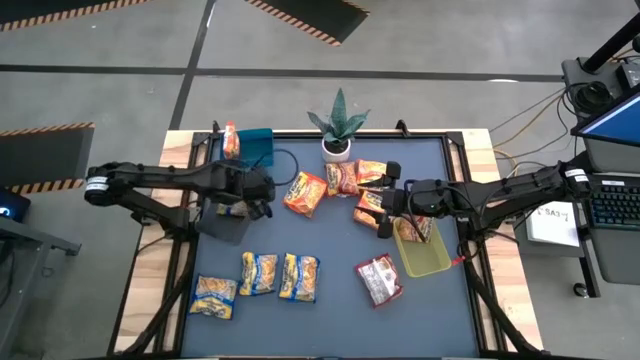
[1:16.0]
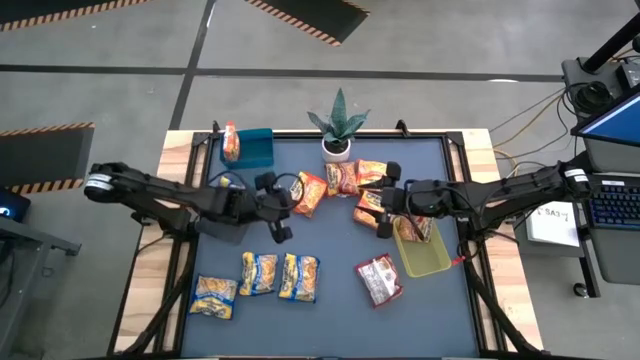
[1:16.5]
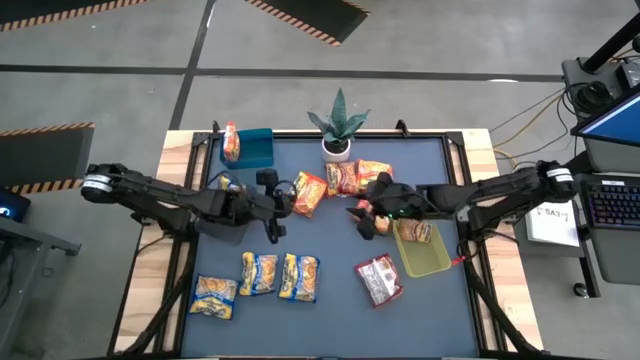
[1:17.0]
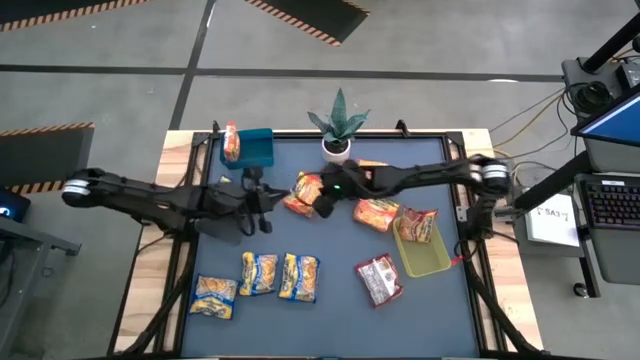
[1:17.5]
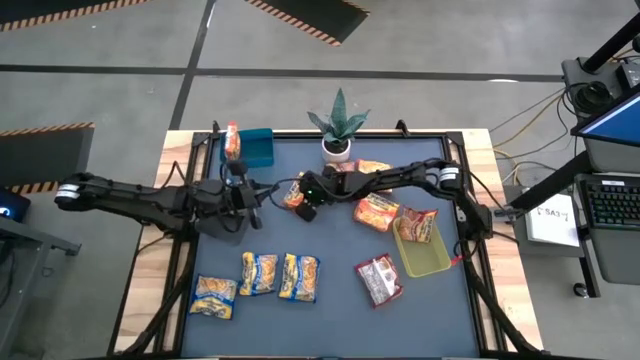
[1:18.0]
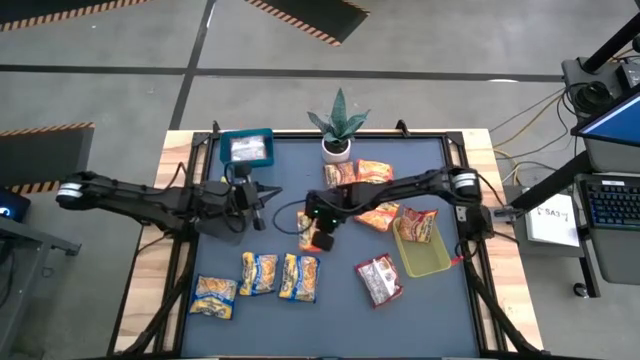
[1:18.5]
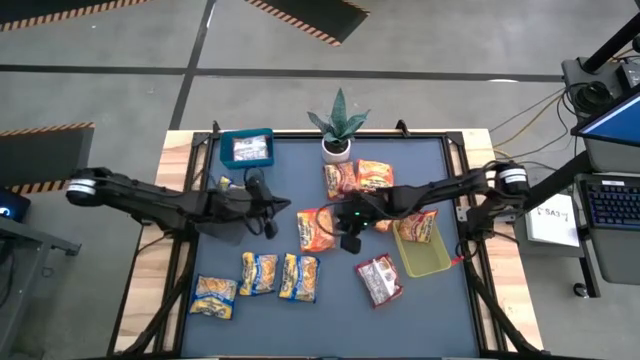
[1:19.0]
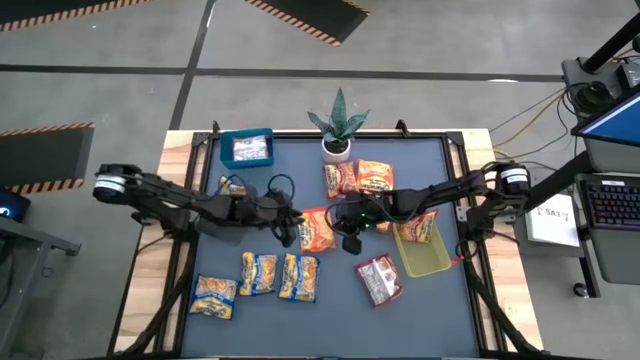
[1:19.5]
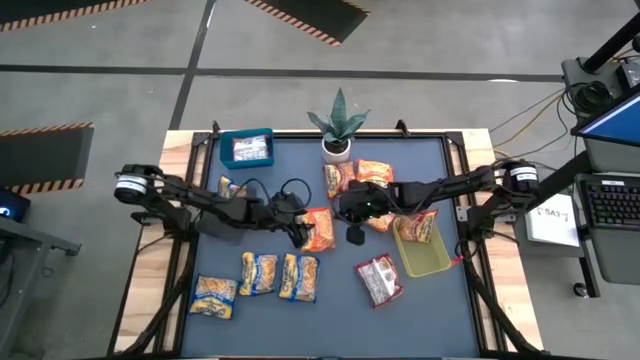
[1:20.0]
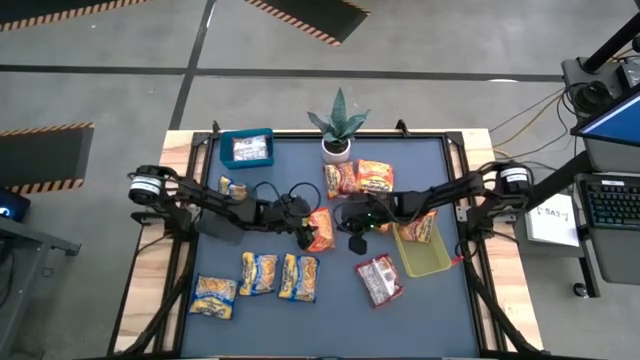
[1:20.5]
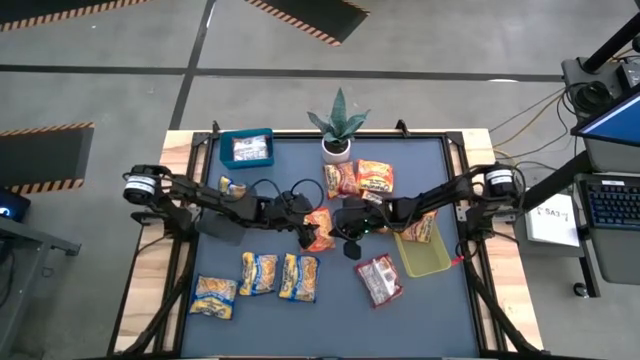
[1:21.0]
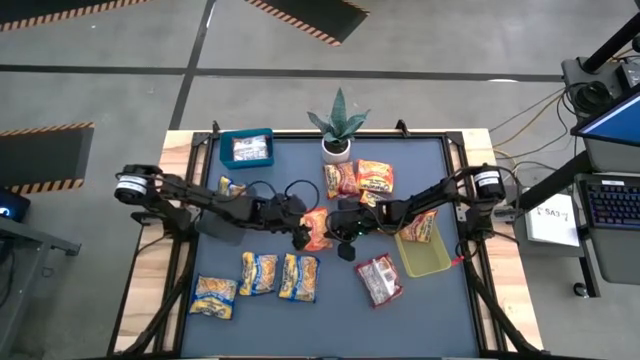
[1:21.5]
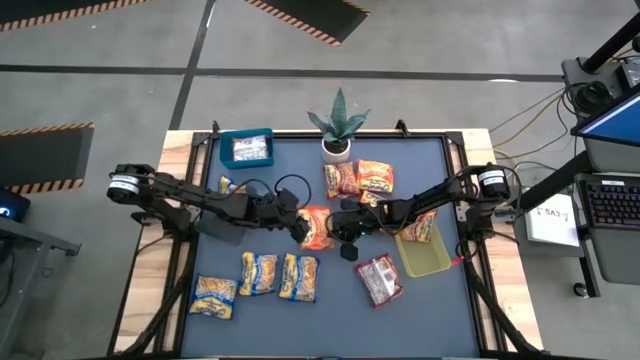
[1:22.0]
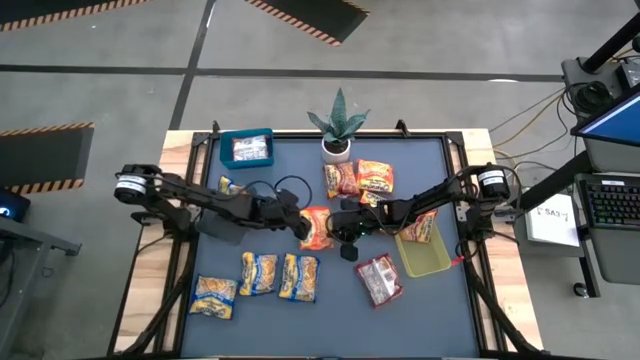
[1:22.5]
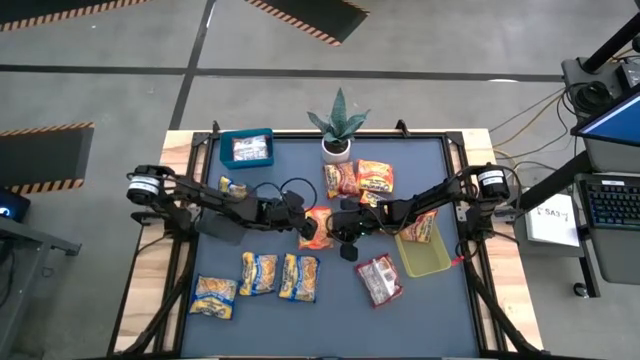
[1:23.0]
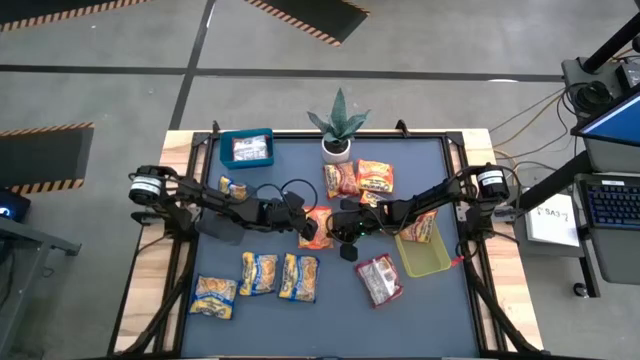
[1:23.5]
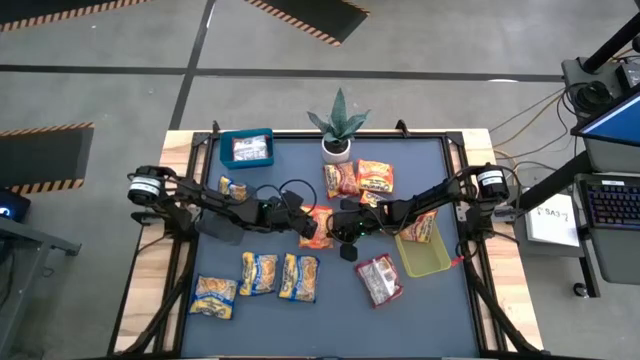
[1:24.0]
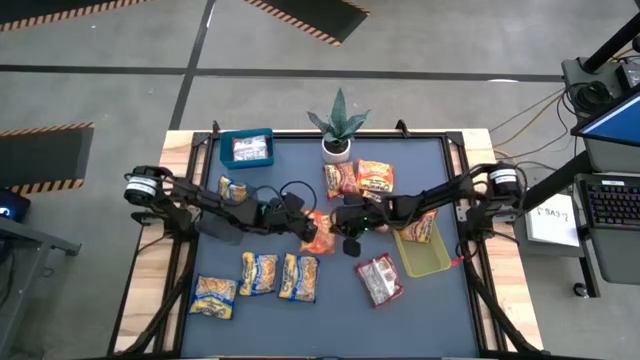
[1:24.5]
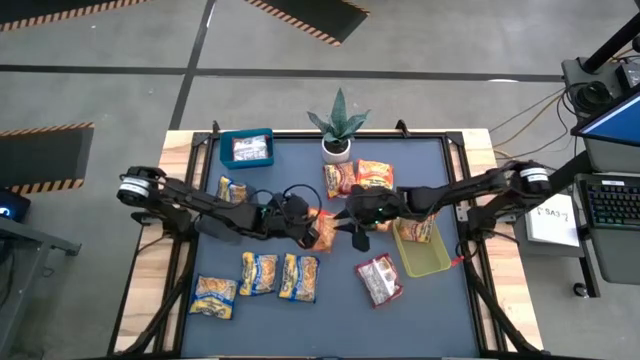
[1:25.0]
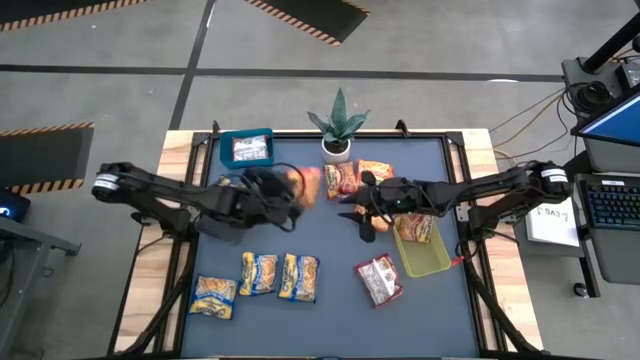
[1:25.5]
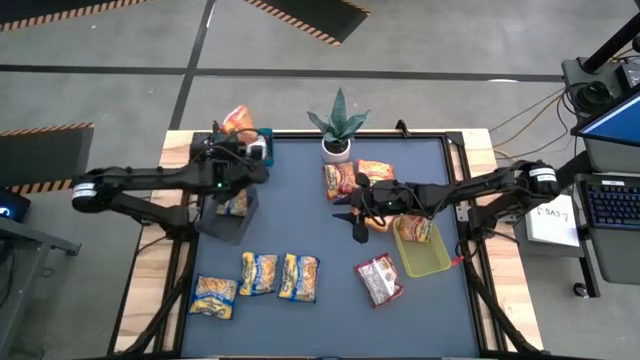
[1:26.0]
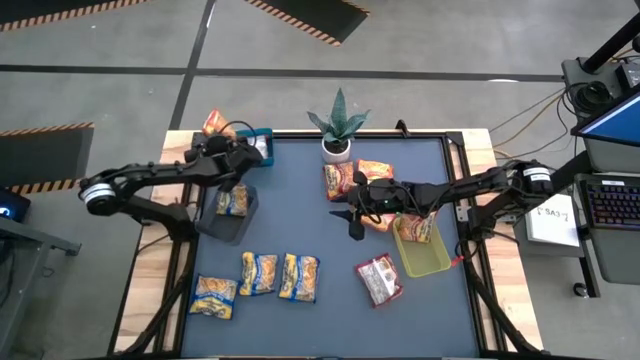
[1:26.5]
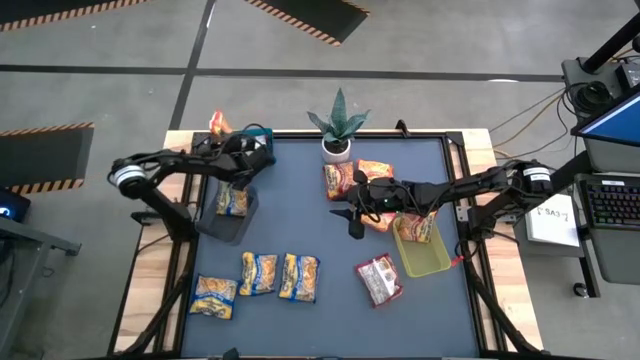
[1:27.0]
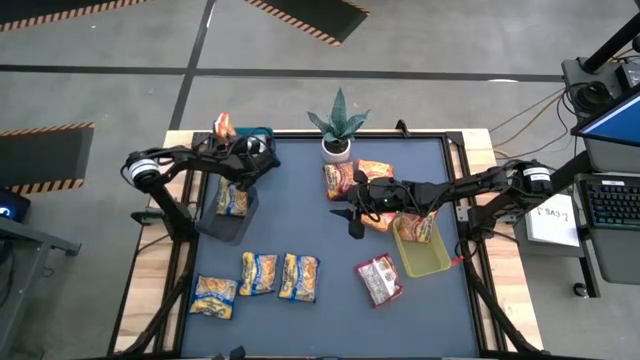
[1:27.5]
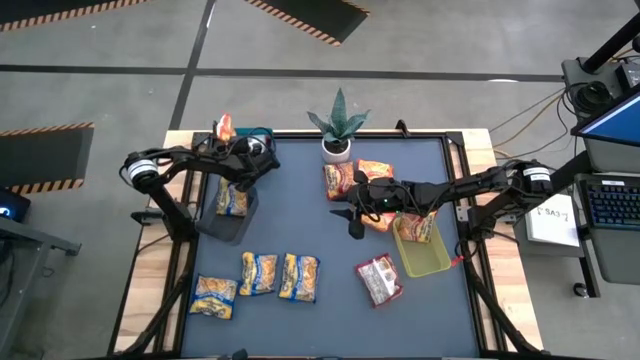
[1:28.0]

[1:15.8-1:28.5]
Task: Sort Maruchan noodles
Put the orange noodle pack into the blue bin

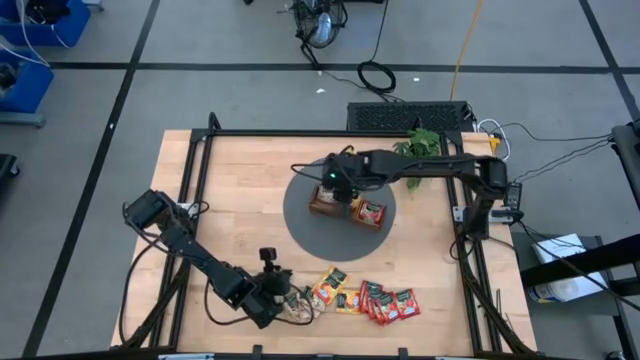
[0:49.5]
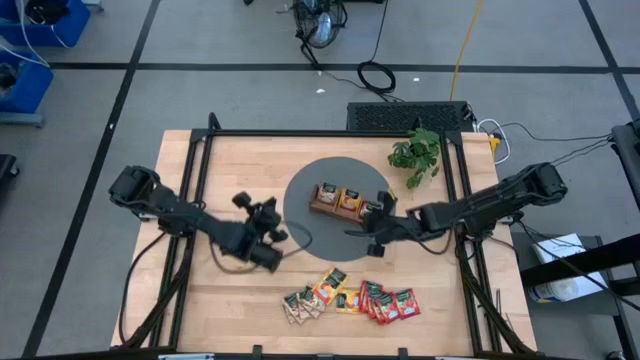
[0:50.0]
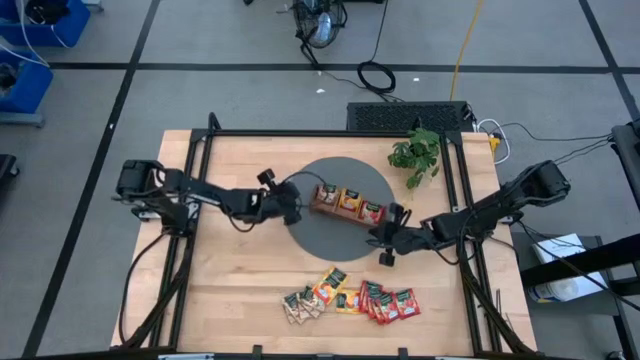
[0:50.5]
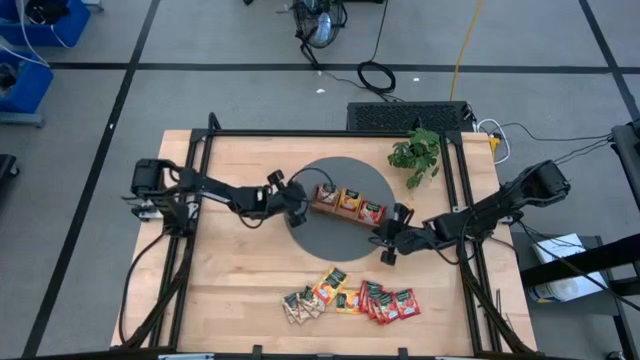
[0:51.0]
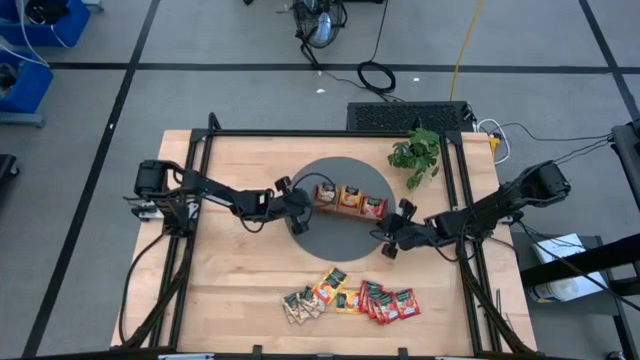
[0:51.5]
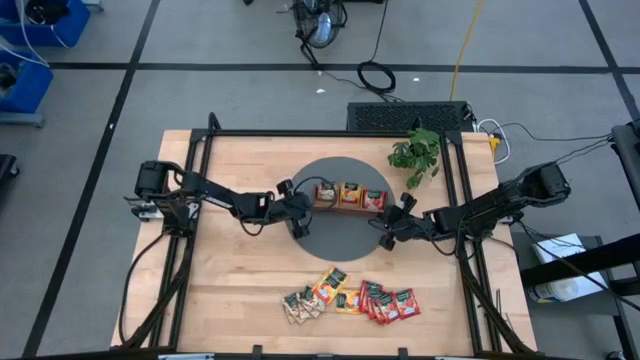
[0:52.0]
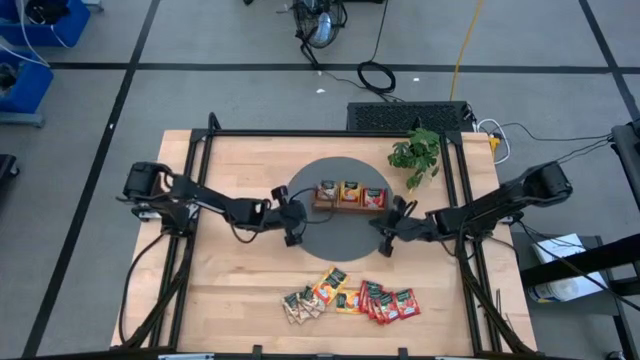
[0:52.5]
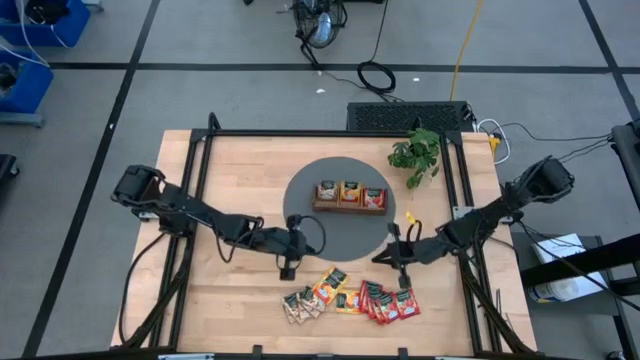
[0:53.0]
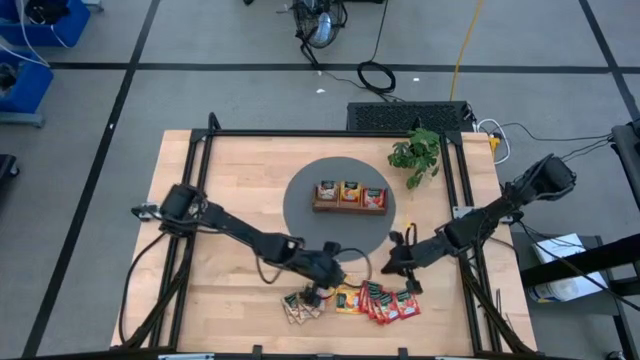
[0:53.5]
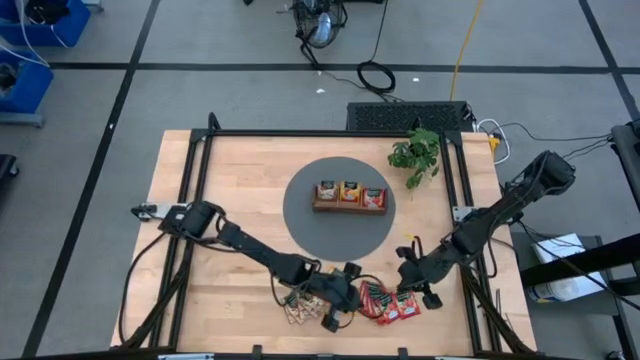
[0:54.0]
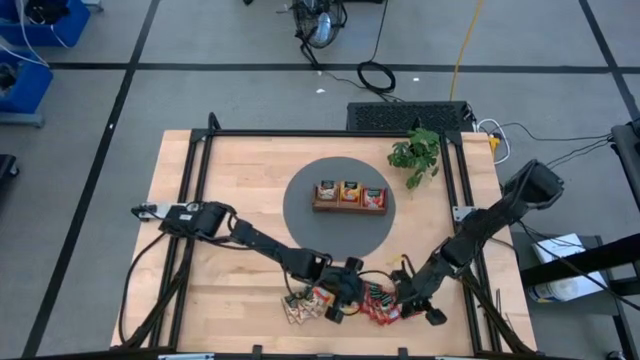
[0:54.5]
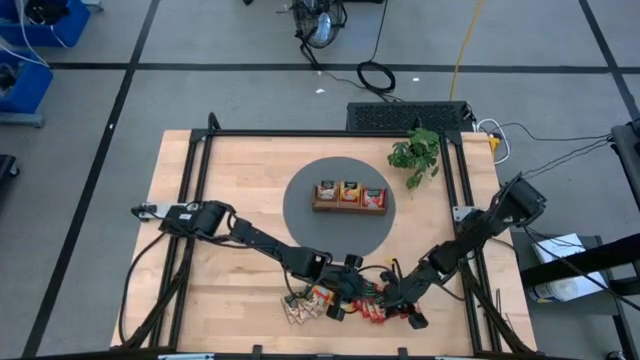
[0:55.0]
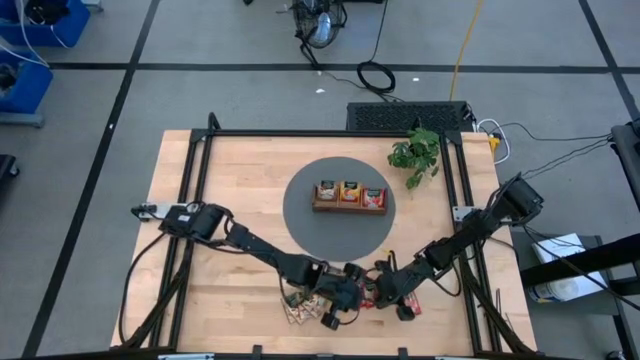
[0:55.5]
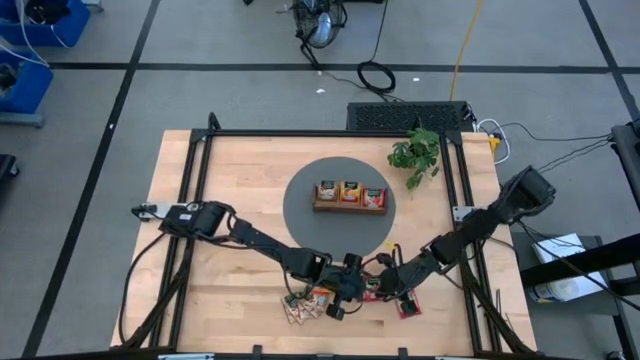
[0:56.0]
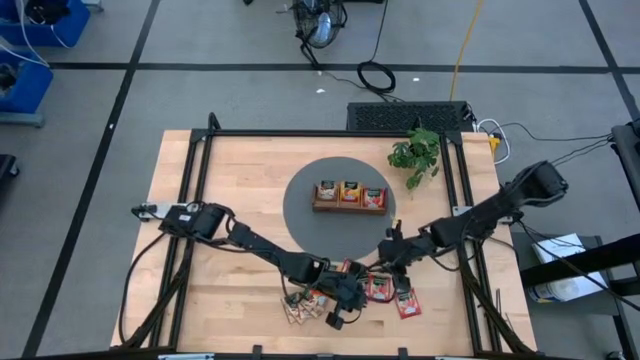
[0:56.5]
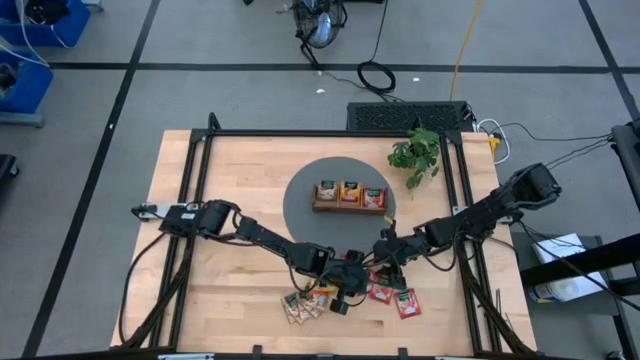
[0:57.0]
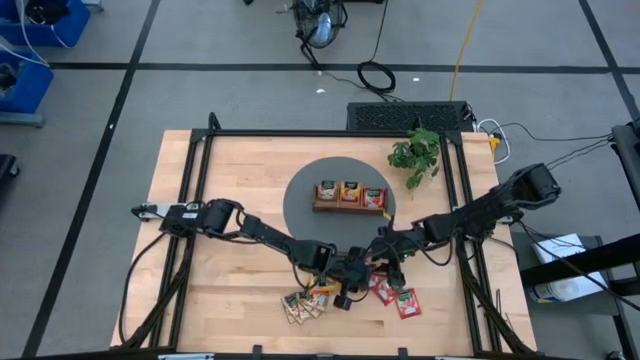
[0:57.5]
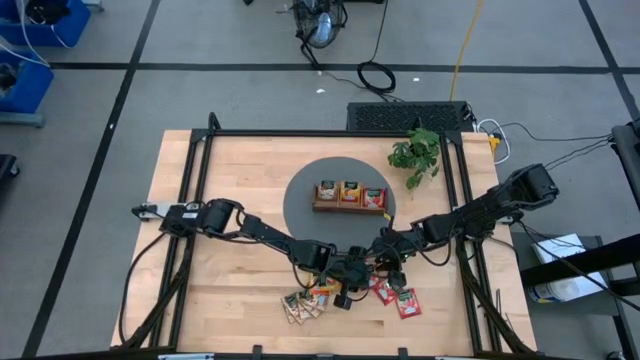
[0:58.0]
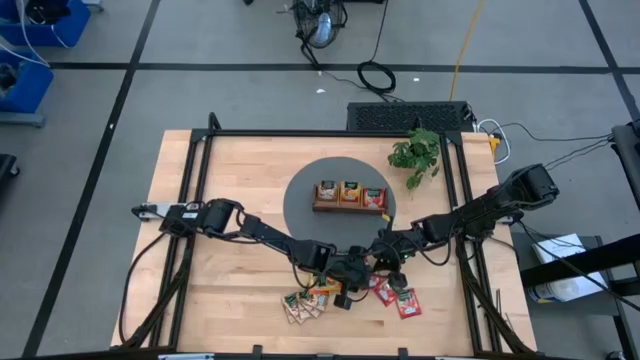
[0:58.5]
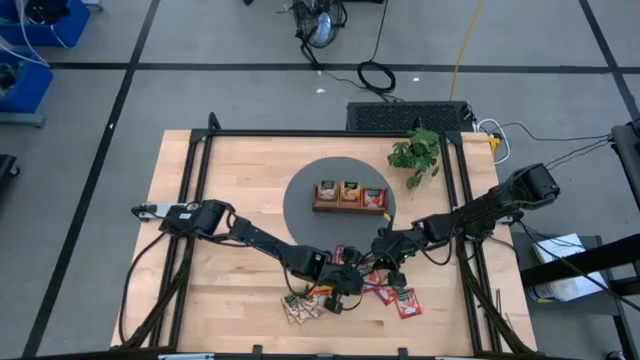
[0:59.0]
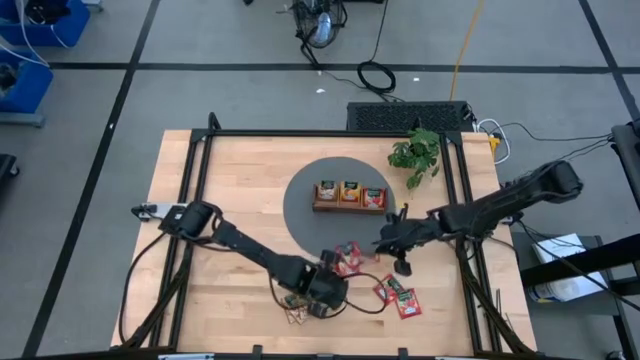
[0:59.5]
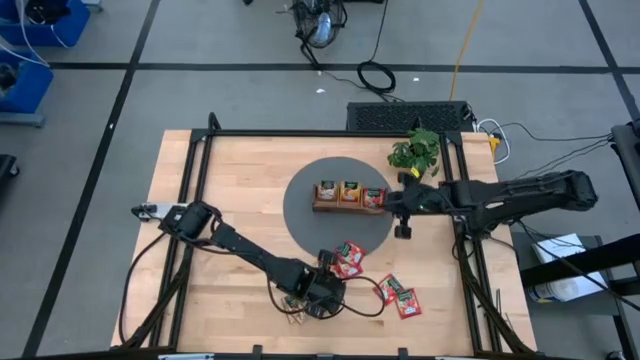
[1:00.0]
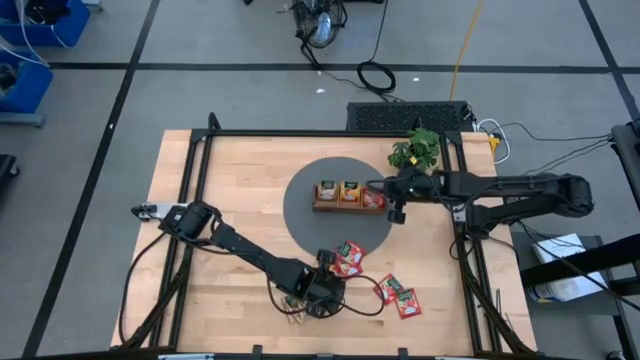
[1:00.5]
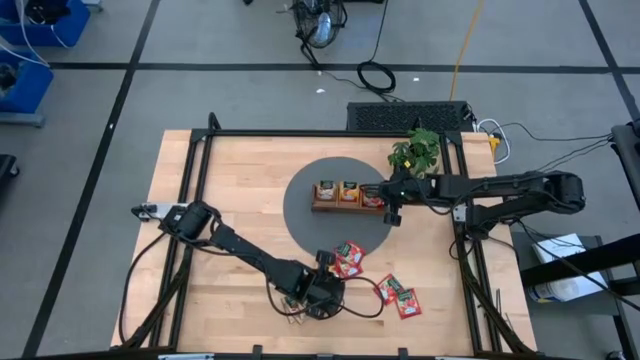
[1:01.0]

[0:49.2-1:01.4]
Task: Pick & Place Tea
Put the red tea bag to the right section into the wooden organizer
